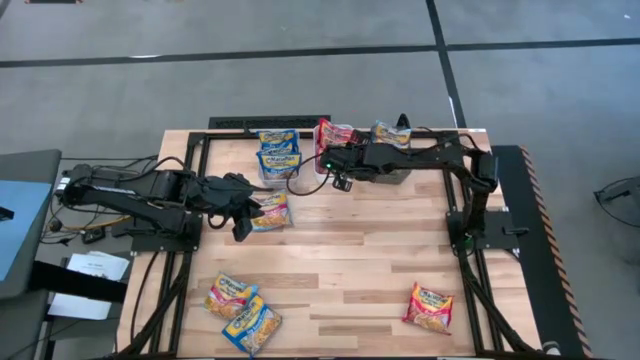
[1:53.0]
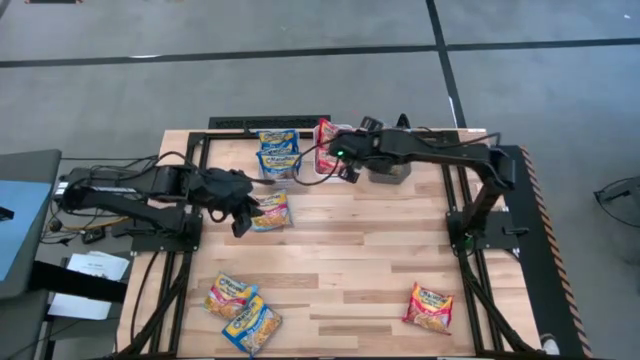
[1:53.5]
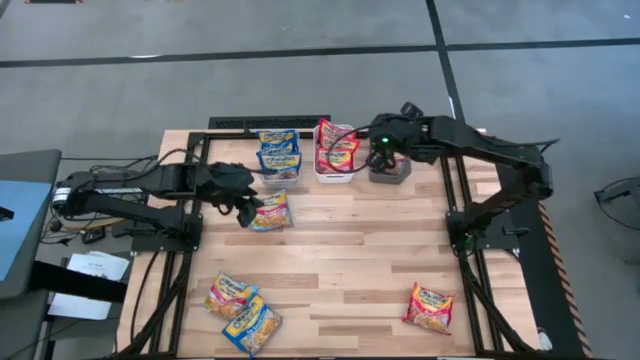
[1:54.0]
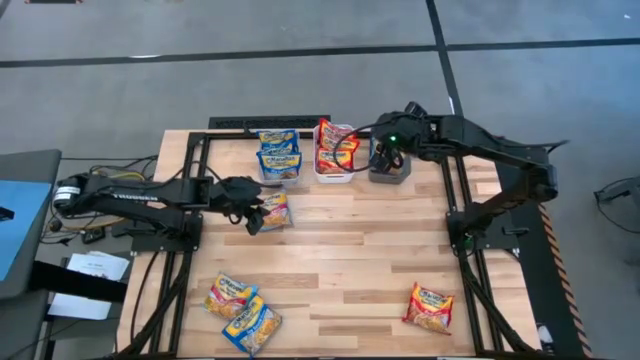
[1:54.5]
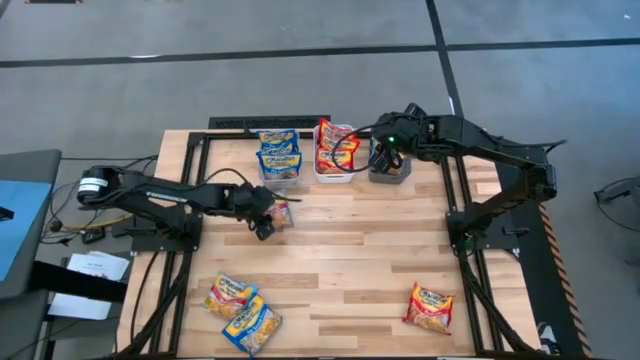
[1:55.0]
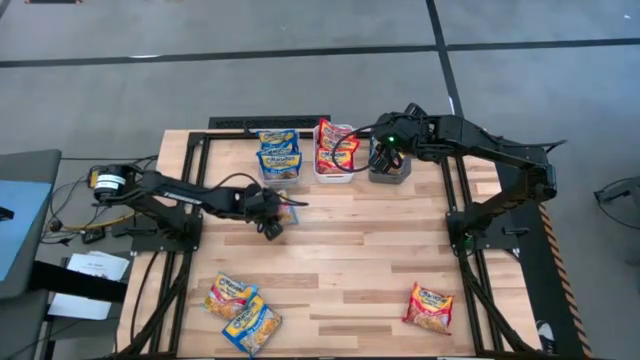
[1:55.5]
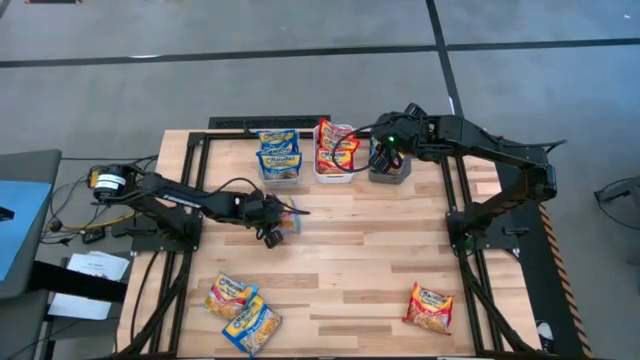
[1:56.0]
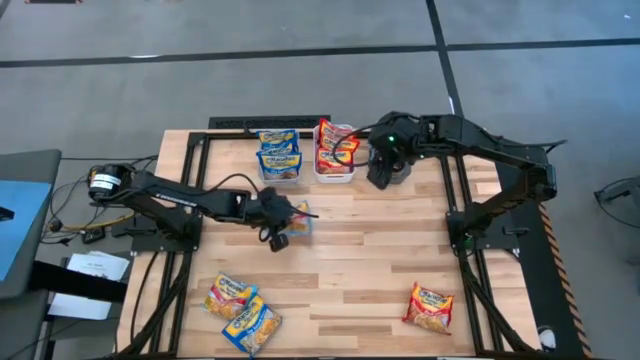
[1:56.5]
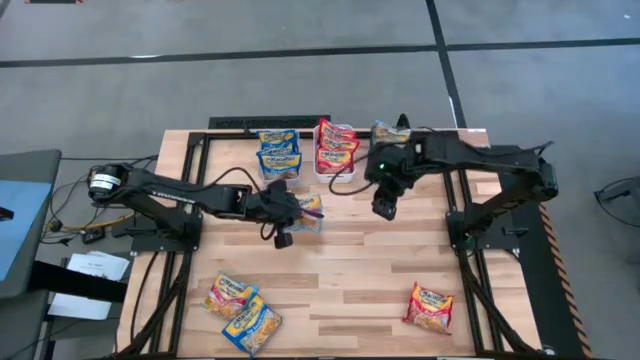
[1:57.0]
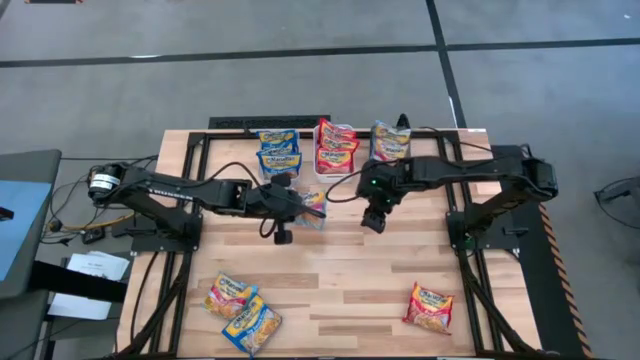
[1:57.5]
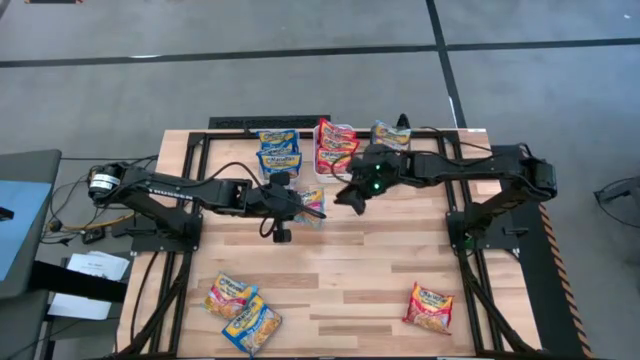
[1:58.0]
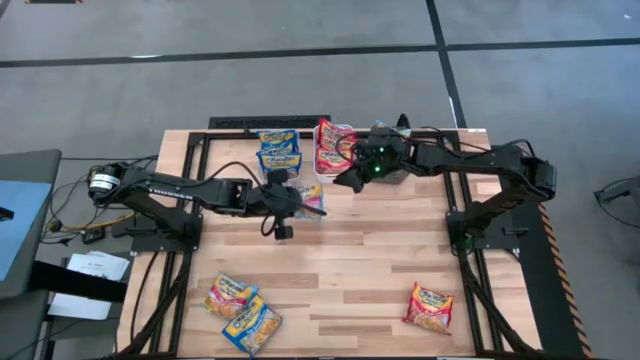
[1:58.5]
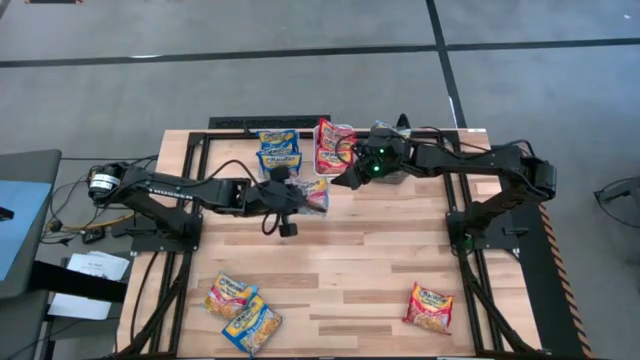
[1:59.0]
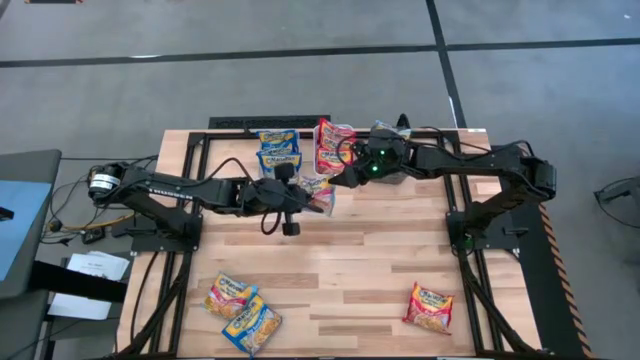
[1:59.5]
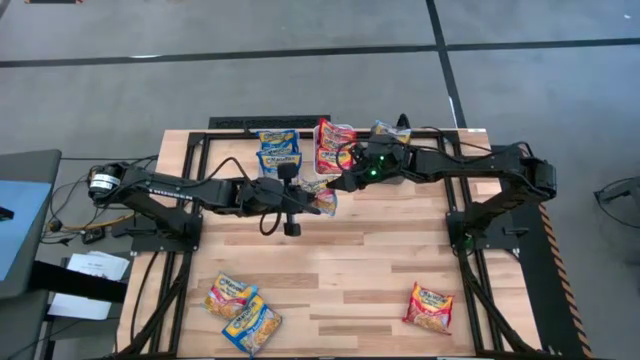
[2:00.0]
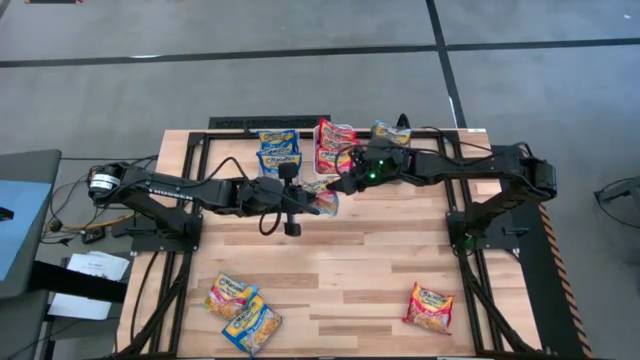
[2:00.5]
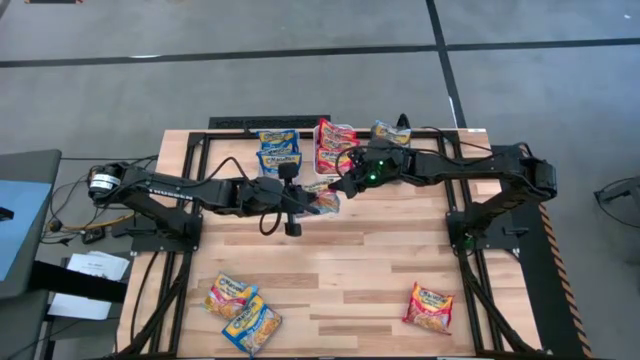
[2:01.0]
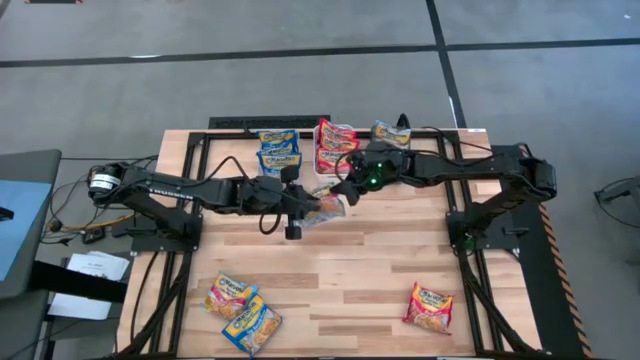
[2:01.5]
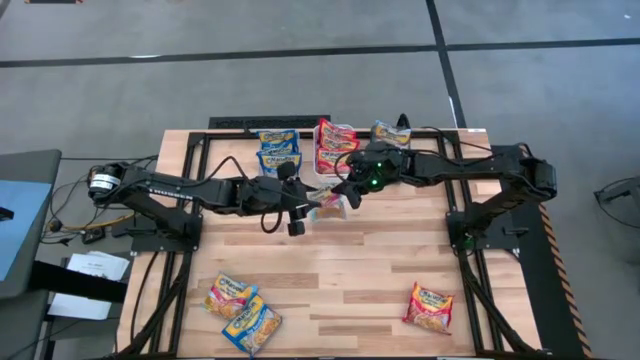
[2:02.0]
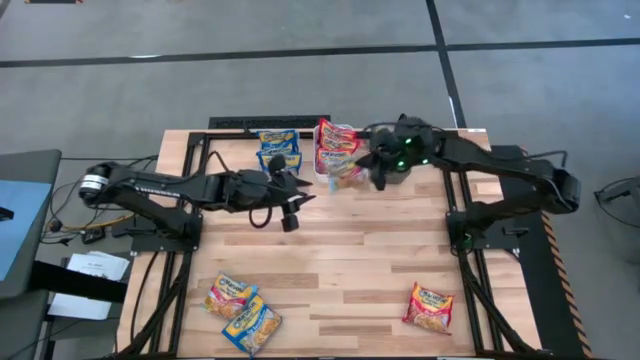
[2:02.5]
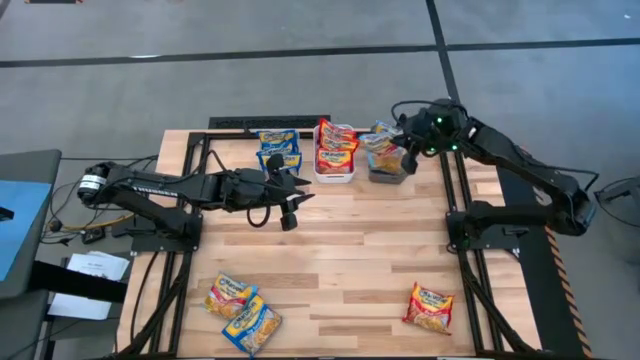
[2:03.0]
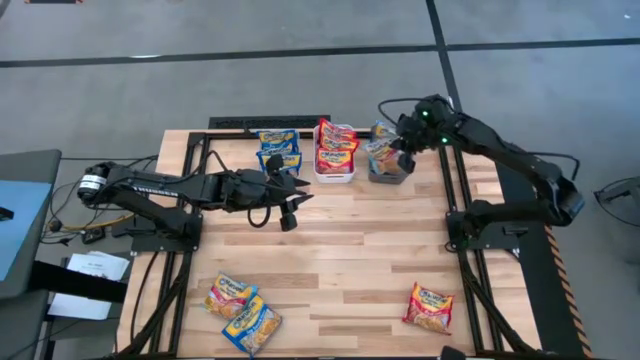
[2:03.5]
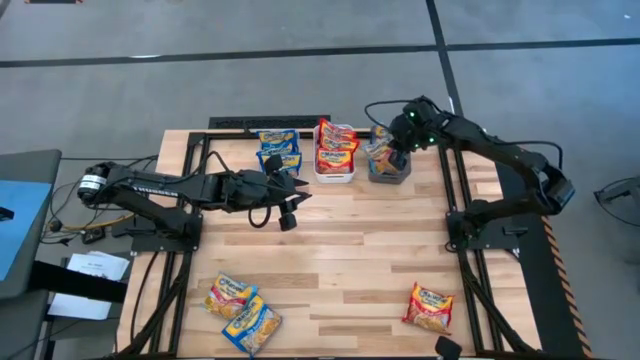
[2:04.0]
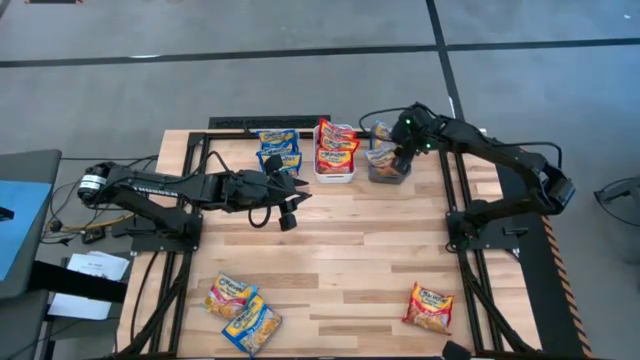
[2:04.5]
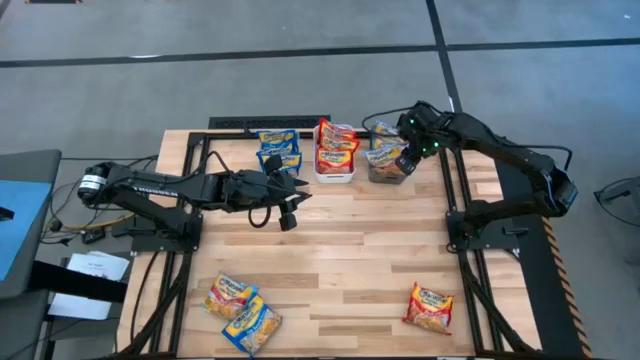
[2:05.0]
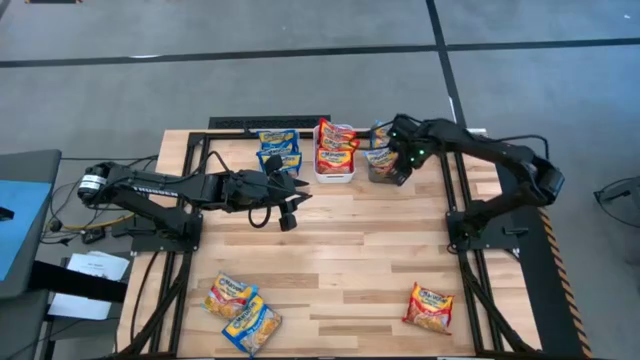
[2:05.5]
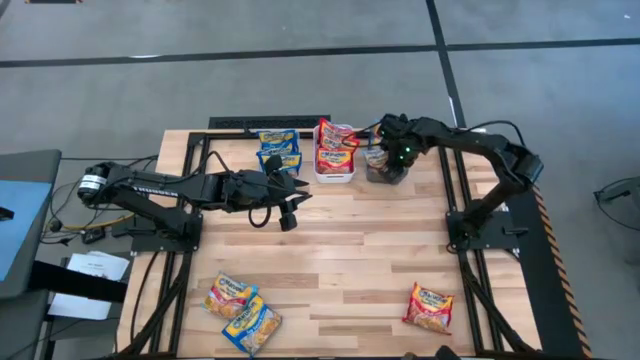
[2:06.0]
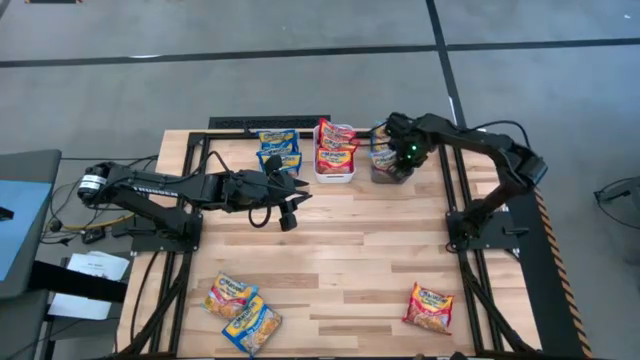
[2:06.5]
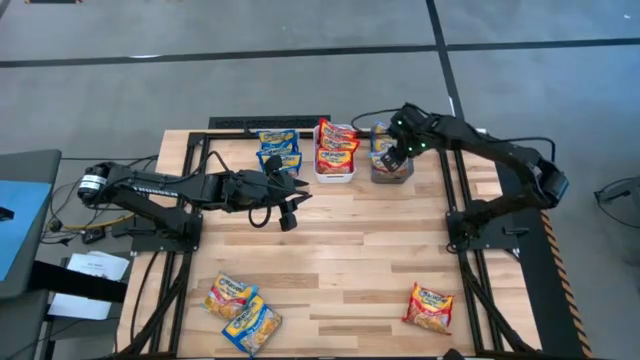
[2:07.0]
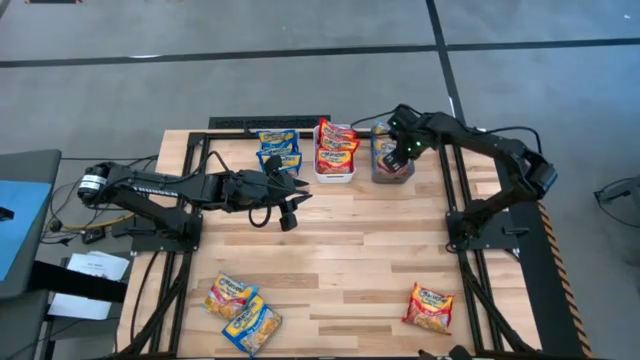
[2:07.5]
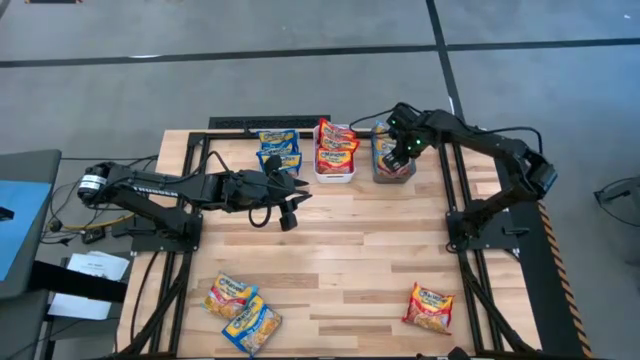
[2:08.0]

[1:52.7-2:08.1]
Task: Sort Maruchan noodles
Put the light blue noodle pack into the black bin

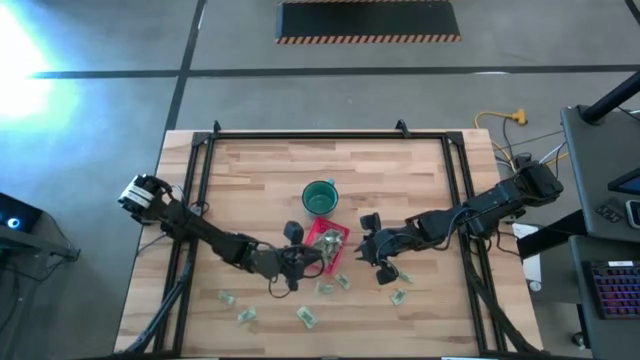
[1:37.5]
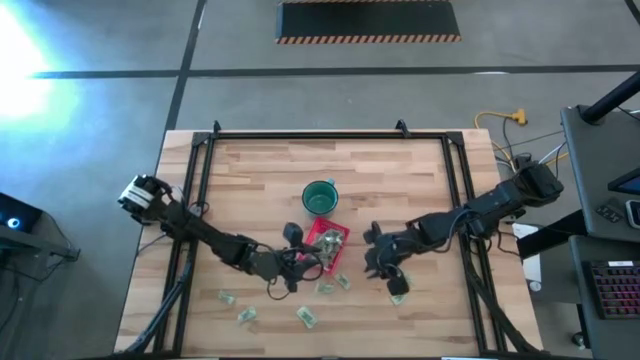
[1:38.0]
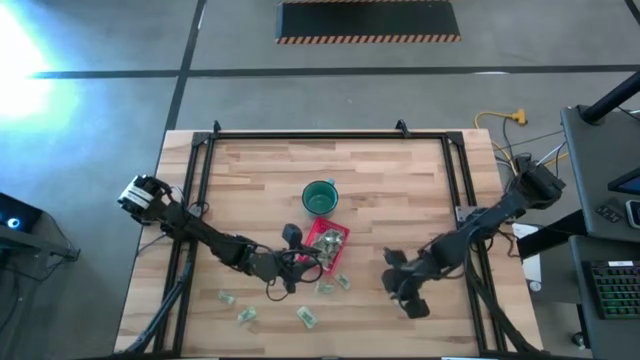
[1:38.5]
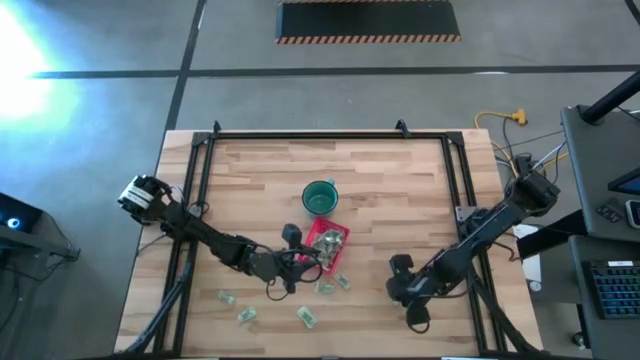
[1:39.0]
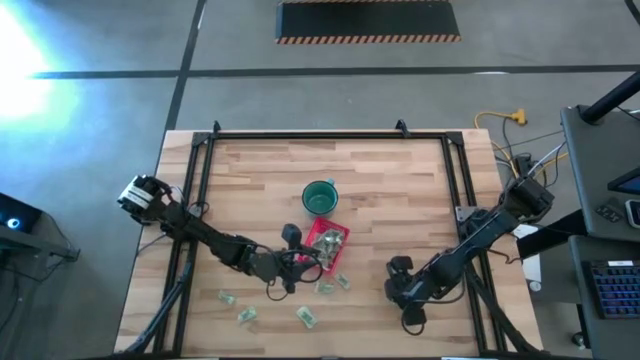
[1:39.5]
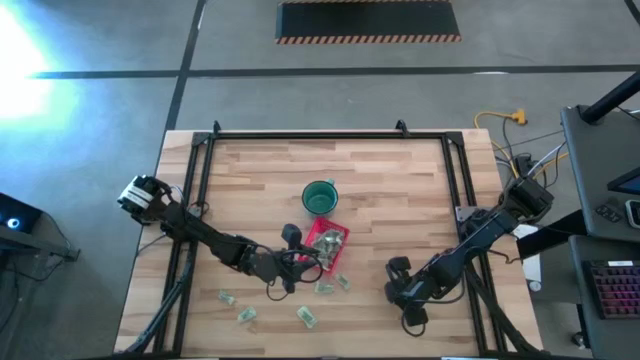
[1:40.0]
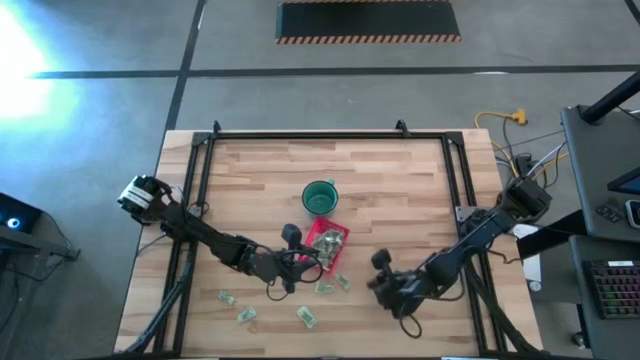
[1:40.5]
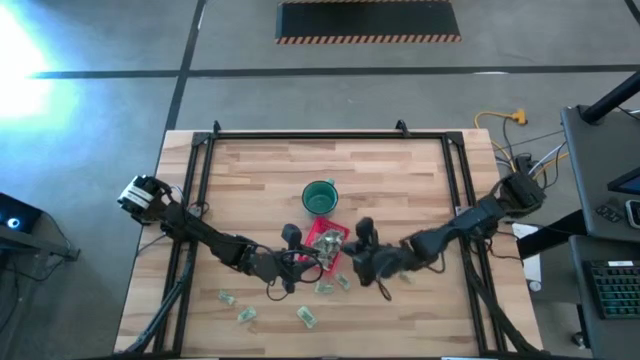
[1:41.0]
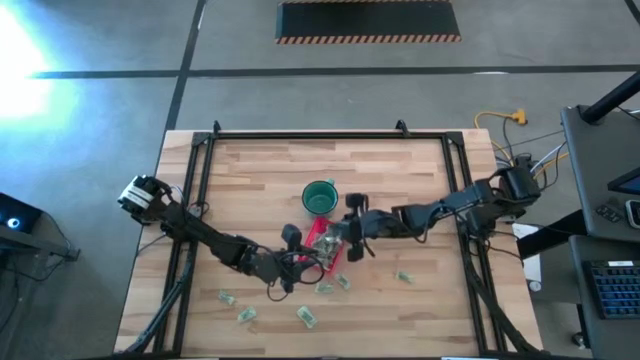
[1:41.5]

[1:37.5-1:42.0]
Task: Pick and place items into bin
Put the light green stevia packet into the red bin

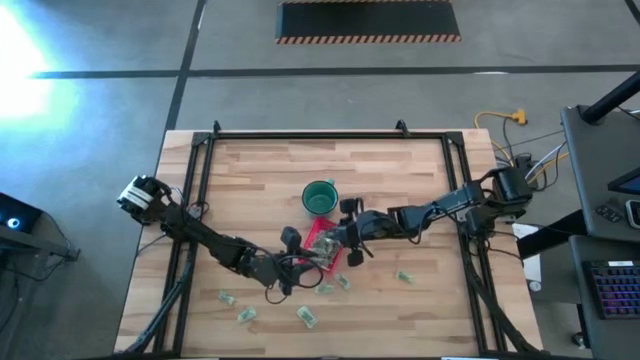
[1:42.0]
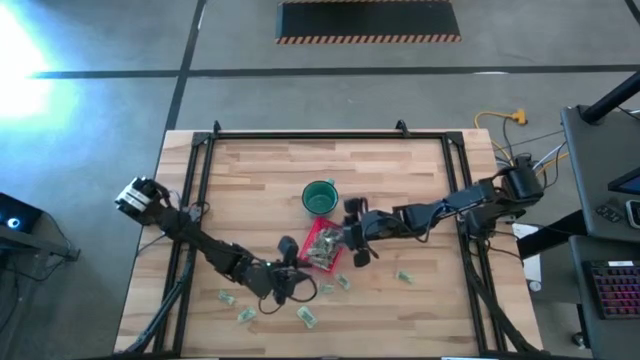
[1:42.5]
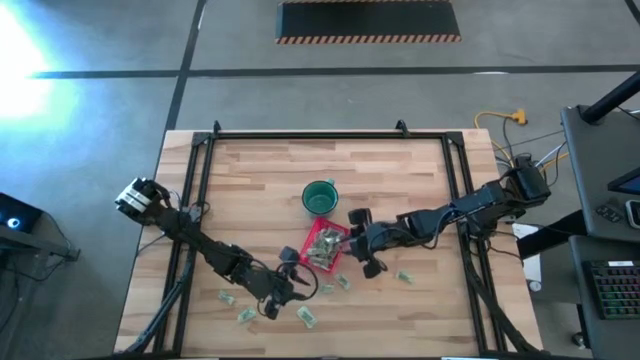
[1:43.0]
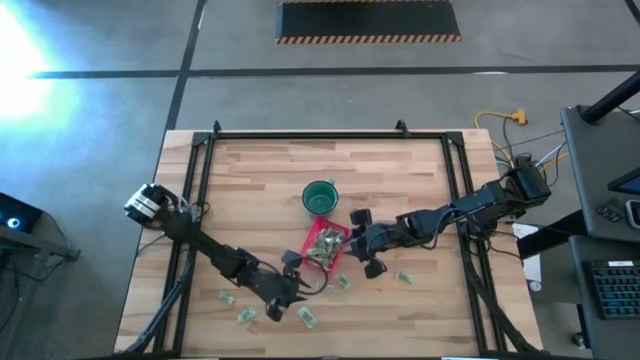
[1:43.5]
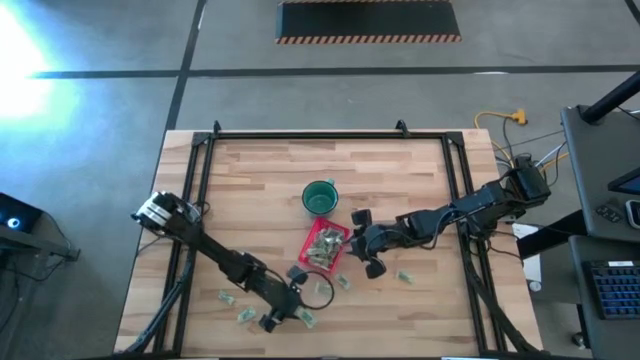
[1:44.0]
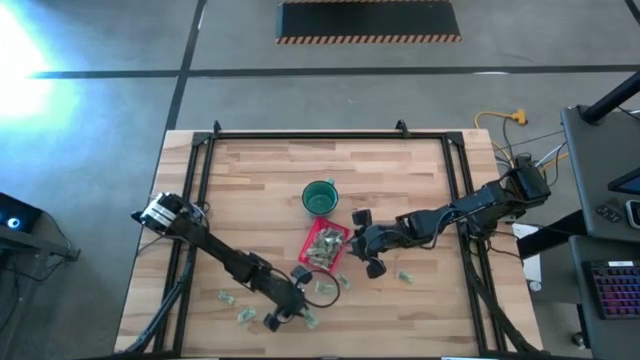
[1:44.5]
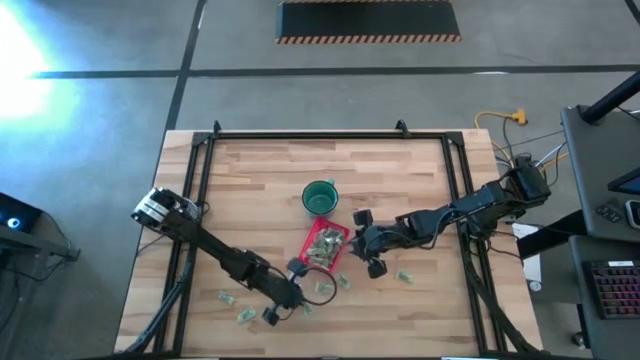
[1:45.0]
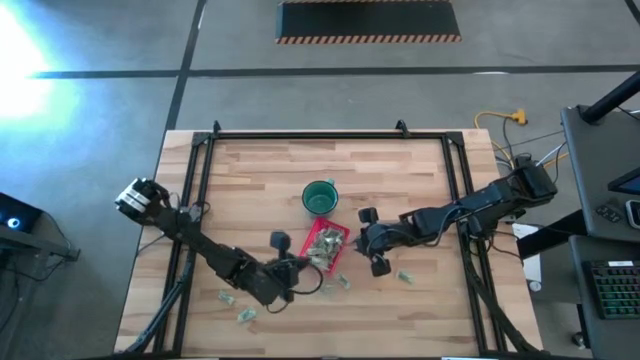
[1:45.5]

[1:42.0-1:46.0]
Put the light green stevia packet into the red bin
